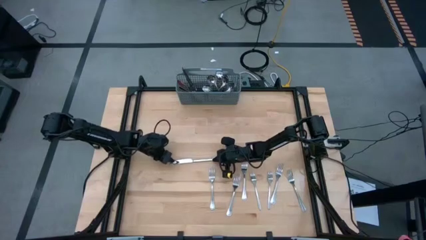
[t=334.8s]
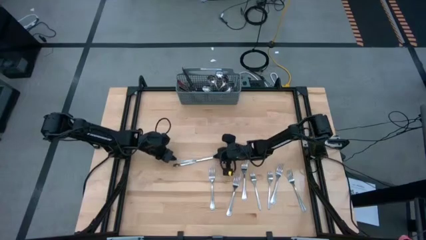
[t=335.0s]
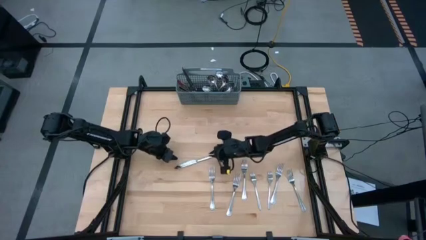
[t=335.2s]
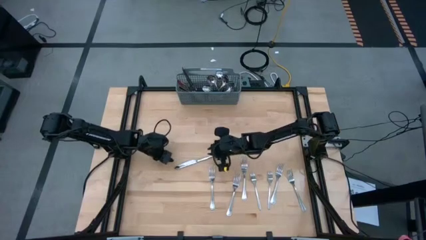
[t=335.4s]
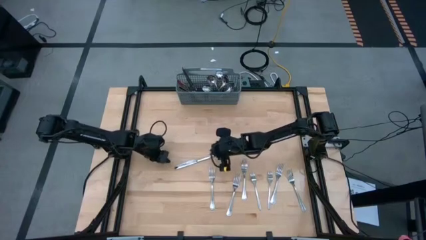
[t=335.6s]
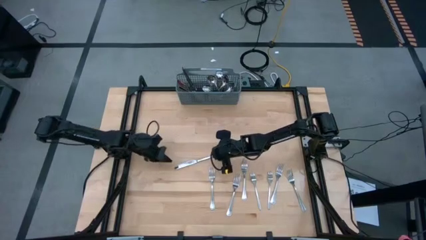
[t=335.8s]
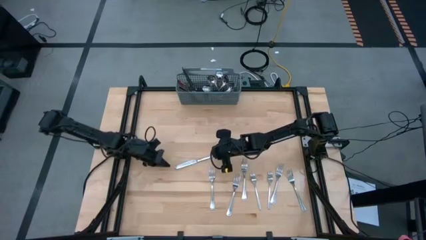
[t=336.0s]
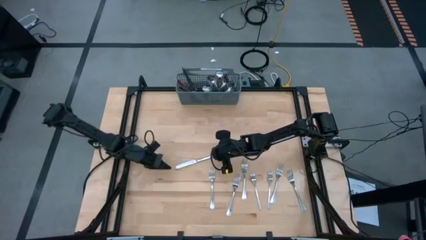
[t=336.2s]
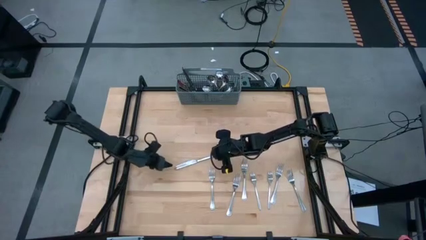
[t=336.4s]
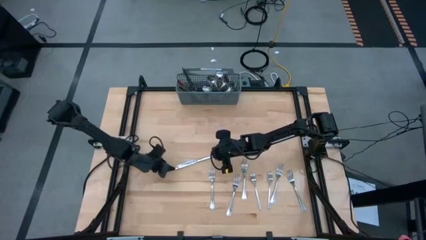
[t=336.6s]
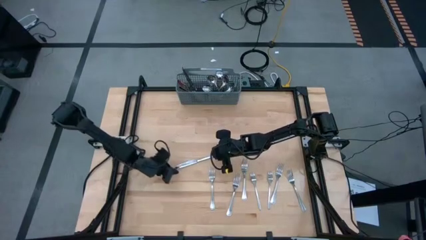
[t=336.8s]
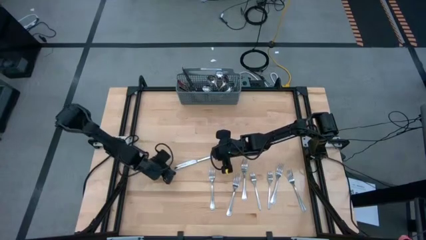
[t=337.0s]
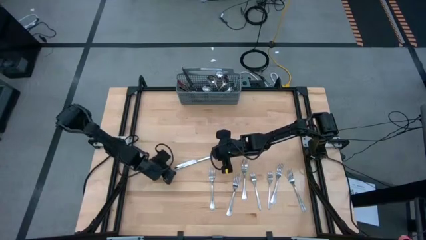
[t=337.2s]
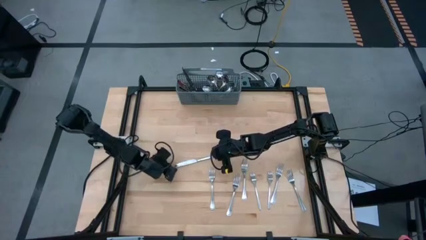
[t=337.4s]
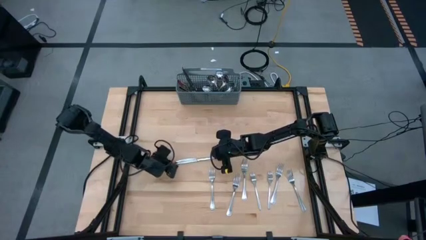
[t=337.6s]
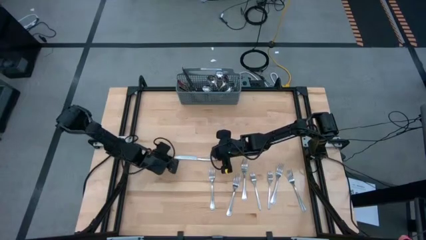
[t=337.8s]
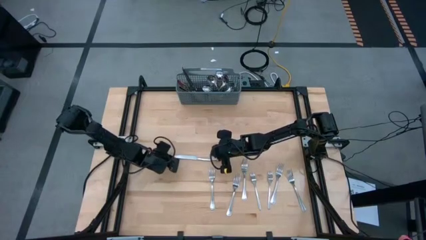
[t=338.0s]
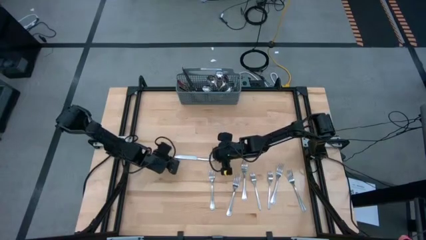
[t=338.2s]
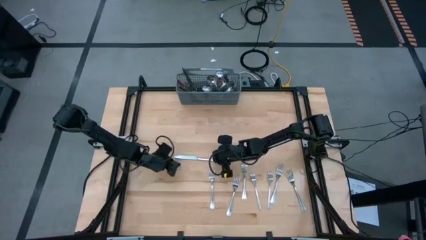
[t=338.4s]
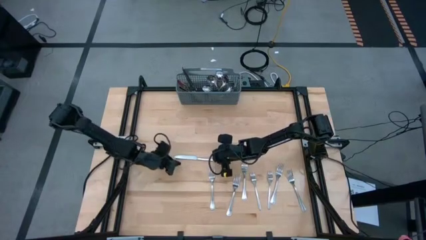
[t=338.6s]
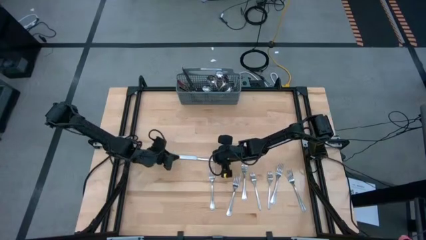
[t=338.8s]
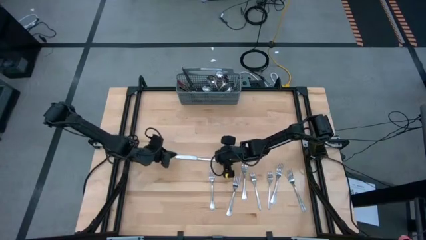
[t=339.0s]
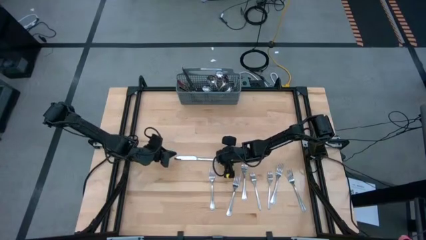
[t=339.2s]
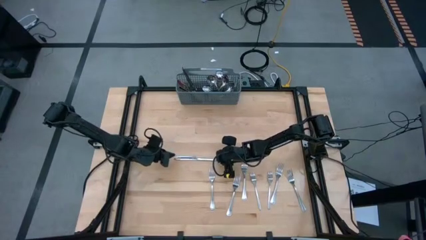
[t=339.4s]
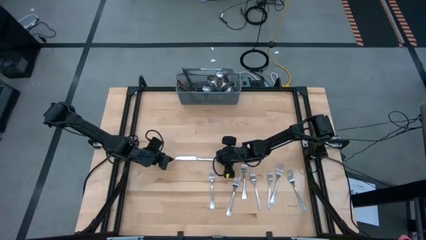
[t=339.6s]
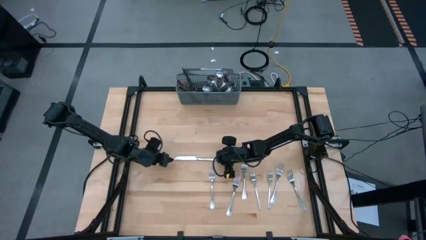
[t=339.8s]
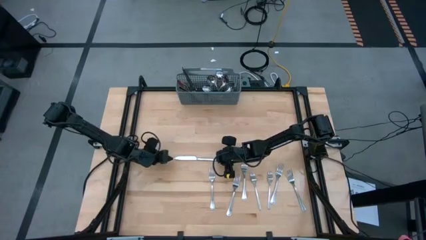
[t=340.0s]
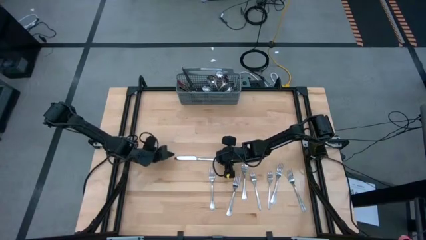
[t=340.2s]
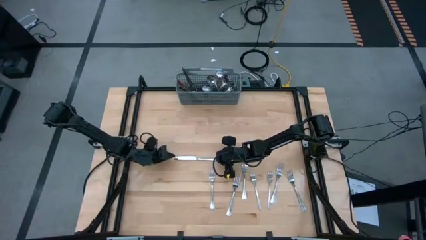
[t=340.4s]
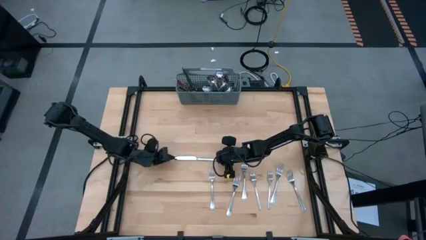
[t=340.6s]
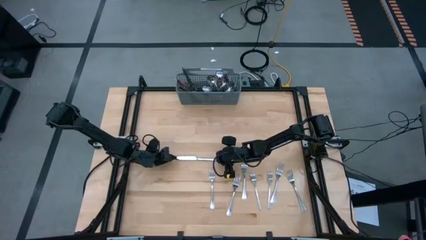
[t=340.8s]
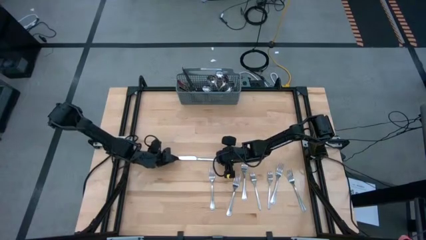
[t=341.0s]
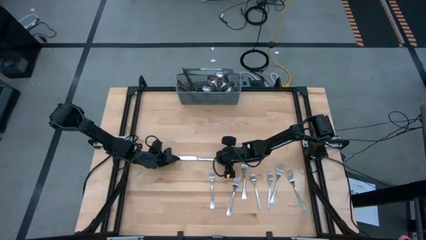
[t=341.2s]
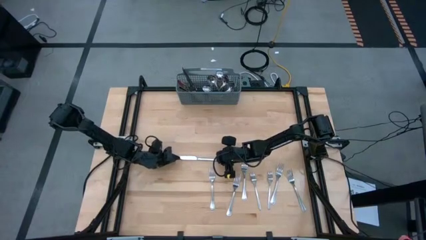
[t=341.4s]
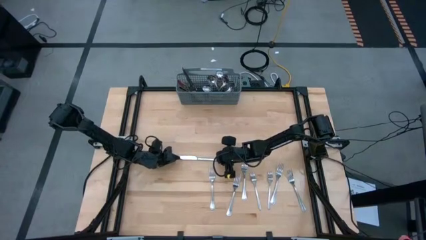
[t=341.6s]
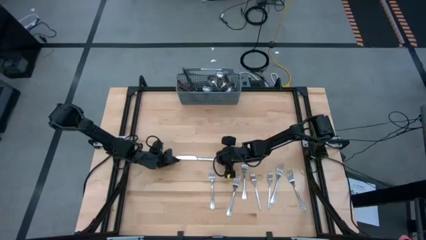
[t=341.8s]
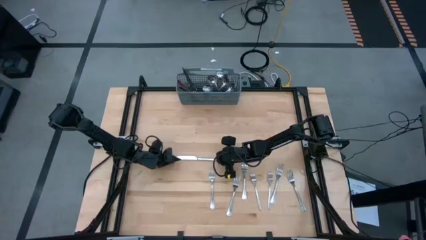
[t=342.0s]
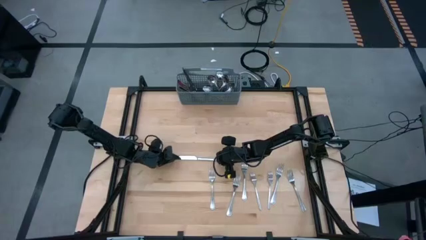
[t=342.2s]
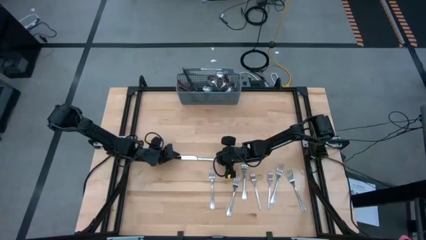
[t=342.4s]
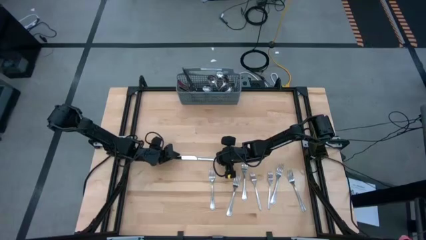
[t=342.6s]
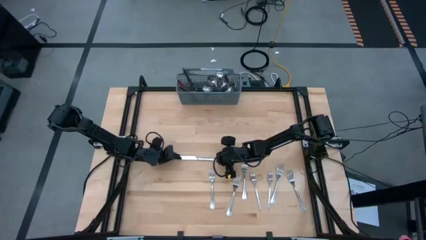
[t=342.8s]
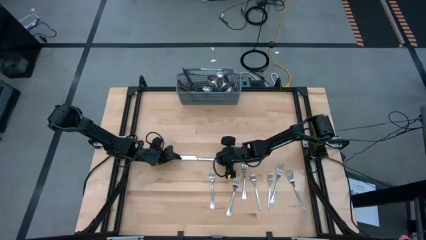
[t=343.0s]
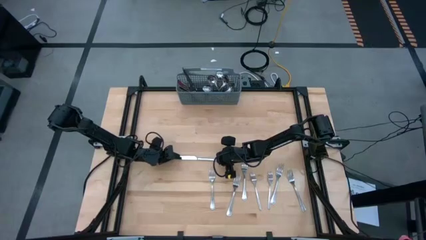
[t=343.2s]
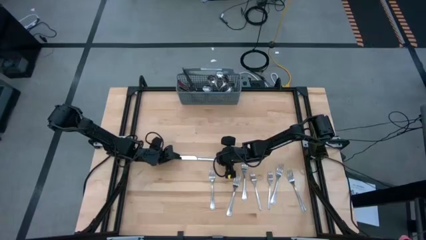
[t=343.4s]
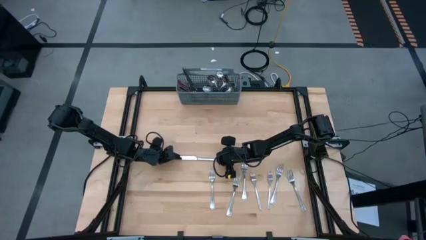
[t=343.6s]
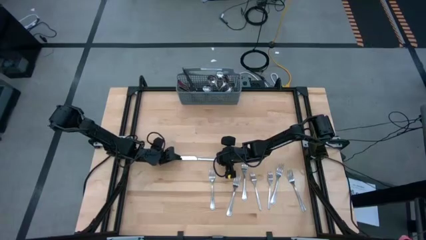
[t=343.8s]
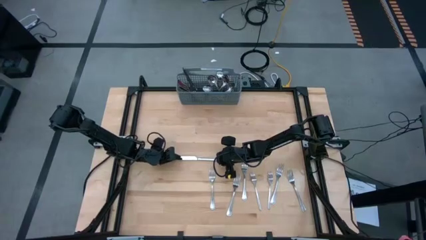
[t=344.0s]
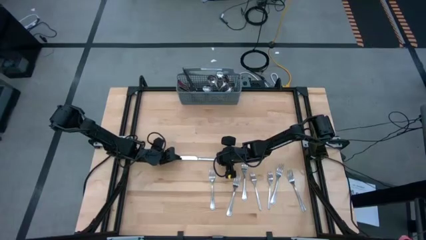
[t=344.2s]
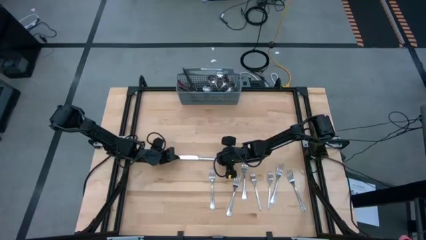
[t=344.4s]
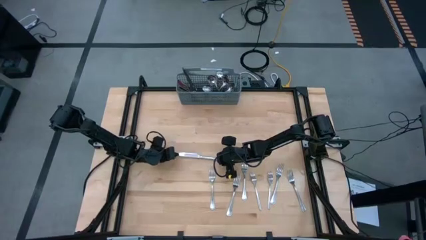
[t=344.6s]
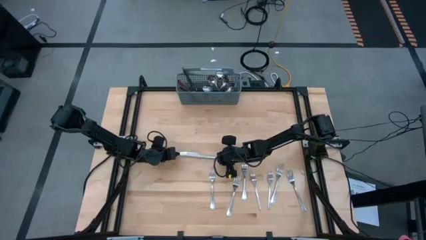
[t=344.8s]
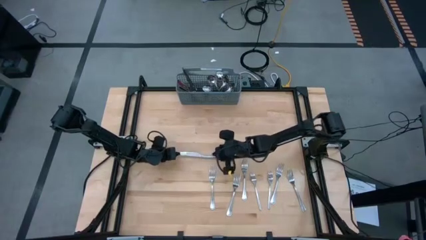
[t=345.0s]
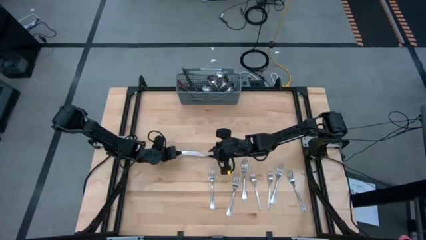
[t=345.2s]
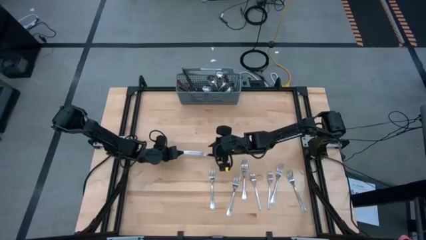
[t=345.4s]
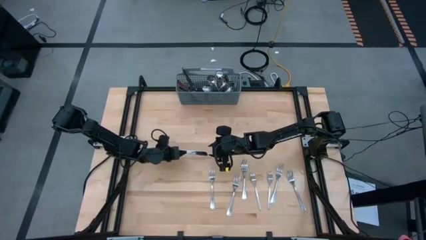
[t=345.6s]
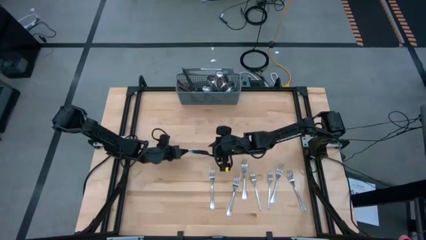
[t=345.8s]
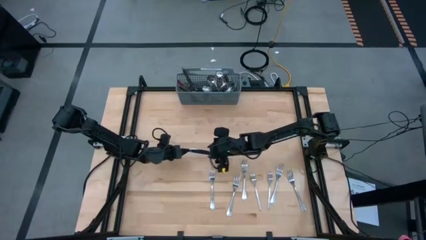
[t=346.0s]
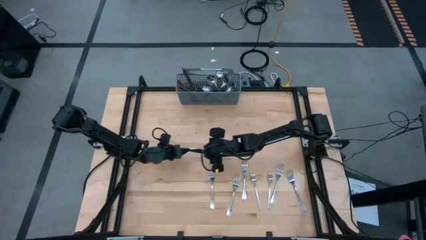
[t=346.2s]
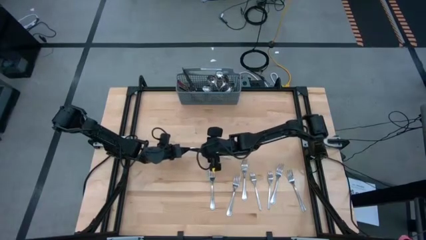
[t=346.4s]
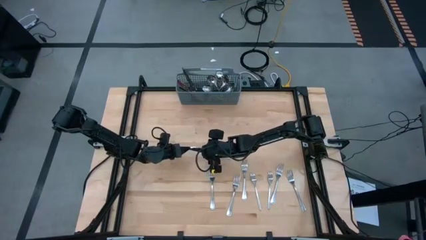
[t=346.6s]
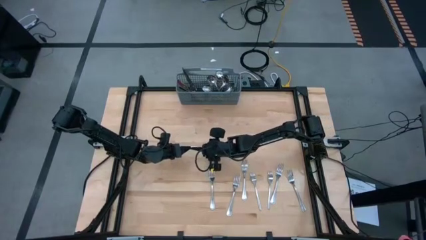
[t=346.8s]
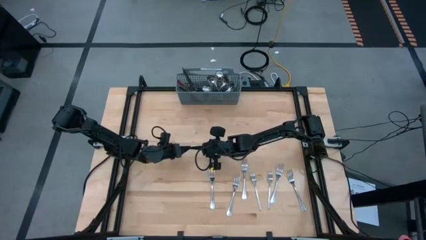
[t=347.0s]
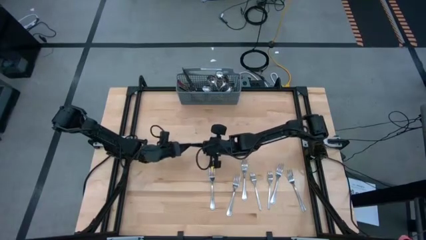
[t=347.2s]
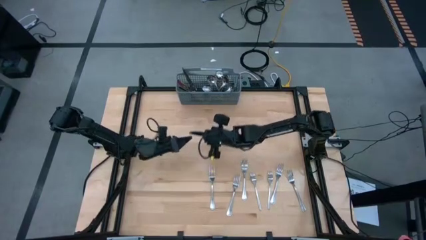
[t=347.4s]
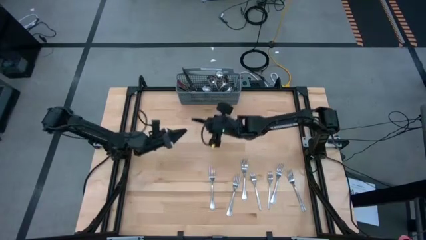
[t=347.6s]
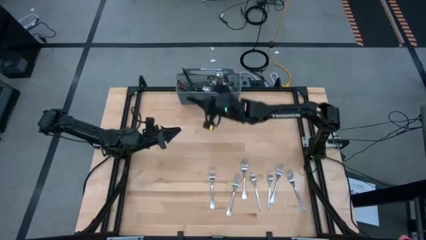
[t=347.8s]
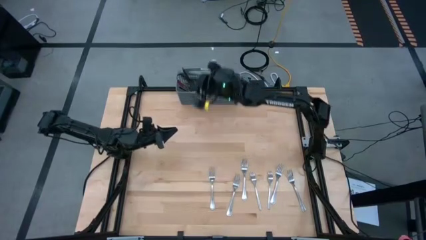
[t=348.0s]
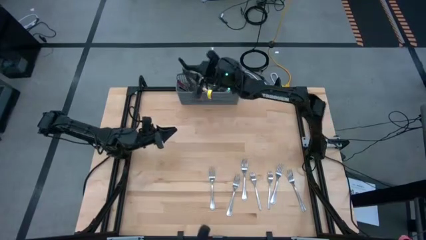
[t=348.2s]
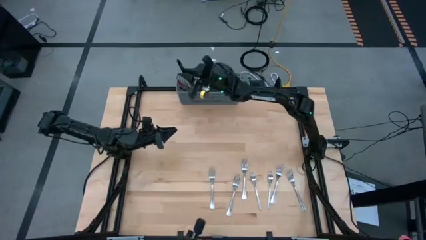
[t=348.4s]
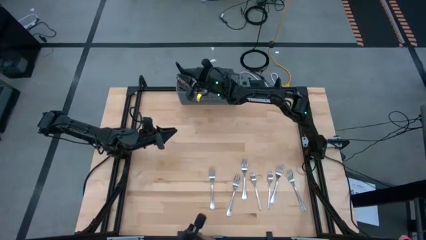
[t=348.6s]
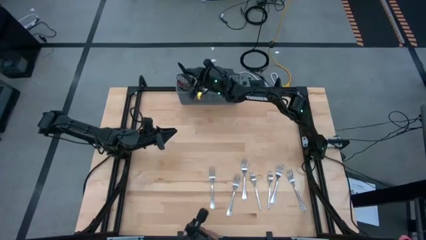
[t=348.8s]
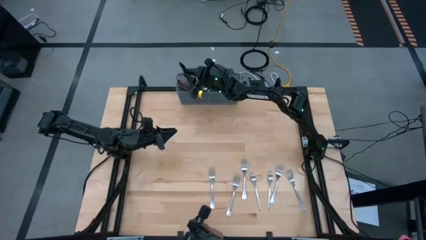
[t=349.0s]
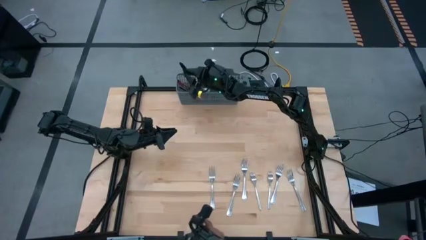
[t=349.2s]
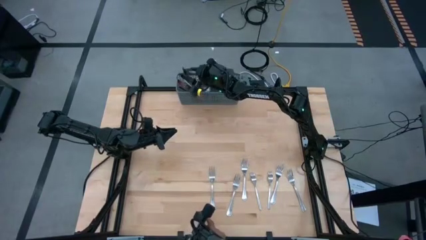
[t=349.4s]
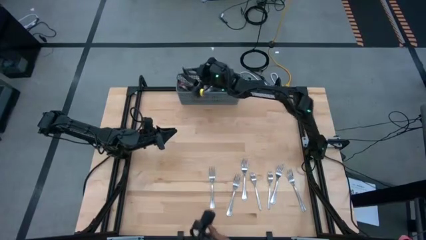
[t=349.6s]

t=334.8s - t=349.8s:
Task: Sort silverware
Put the silver knife into the gray utensil holder

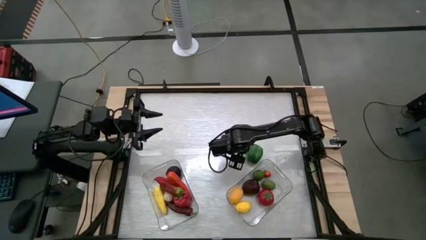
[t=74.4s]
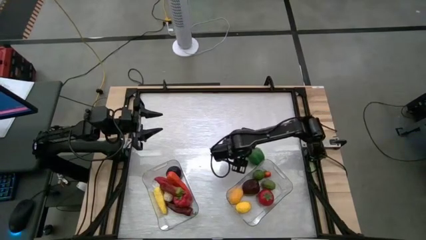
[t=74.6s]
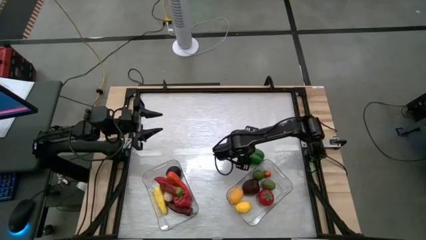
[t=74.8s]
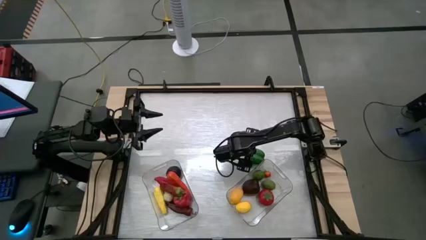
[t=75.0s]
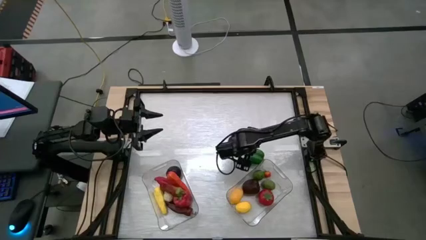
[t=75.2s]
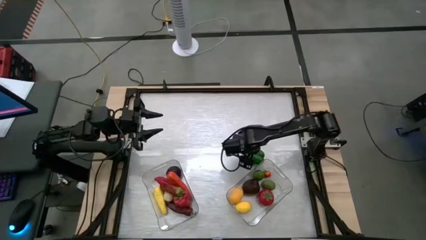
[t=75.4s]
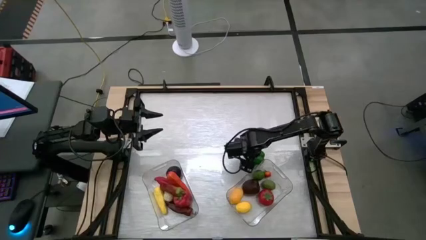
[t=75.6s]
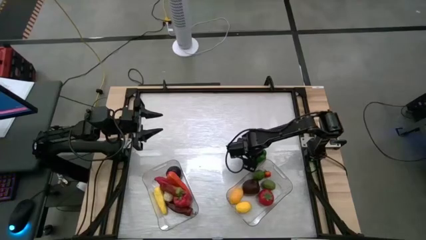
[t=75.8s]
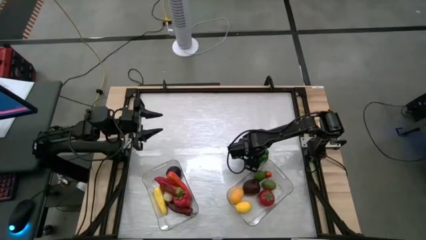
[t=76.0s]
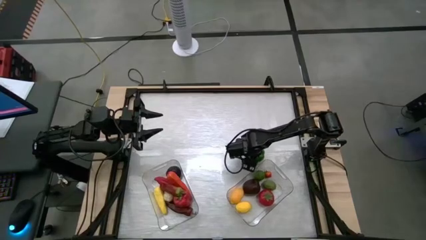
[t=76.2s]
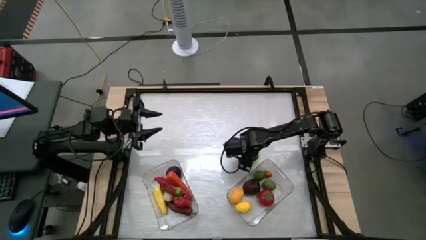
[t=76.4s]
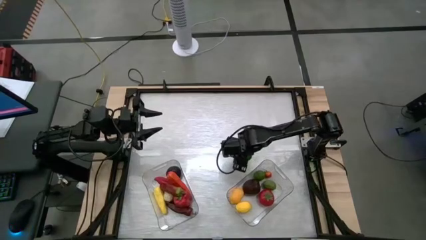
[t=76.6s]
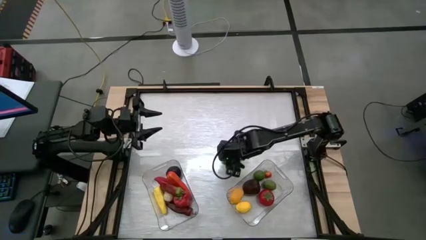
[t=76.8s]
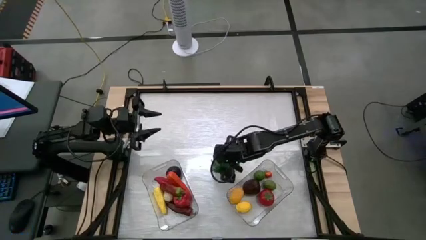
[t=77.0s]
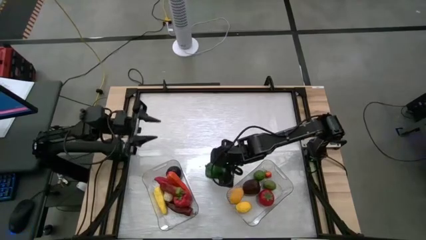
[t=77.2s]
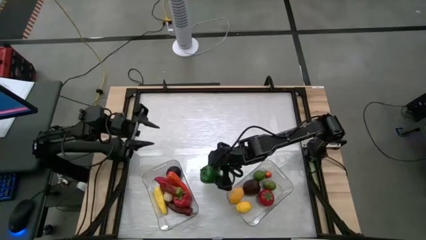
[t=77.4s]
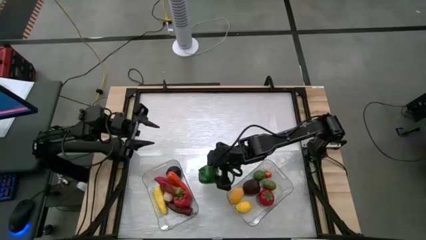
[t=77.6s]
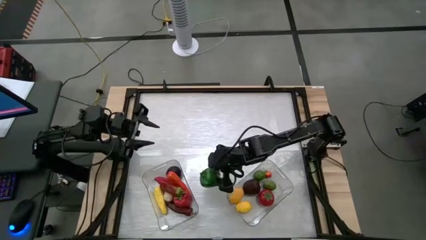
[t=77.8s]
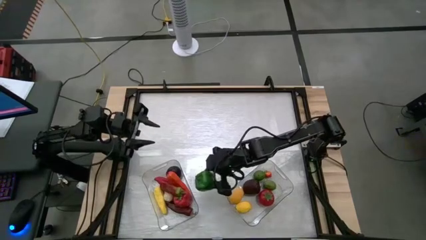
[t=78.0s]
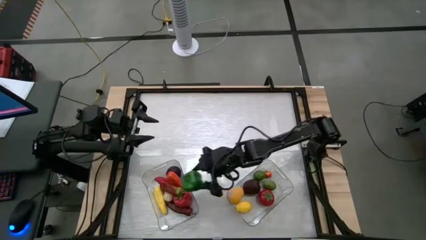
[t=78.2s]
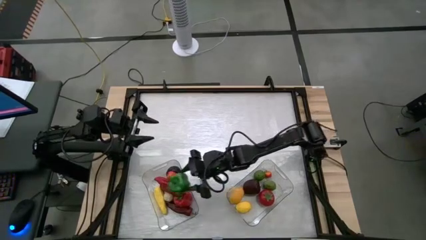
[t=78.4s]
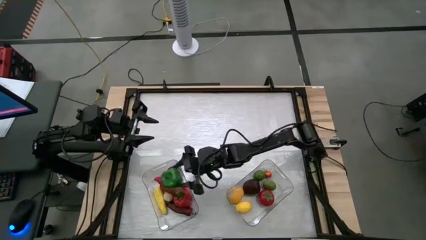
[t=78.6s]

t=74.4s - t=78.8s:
Task: Sort produce into baskets
Put the green bell pepper into the left transparent bin
